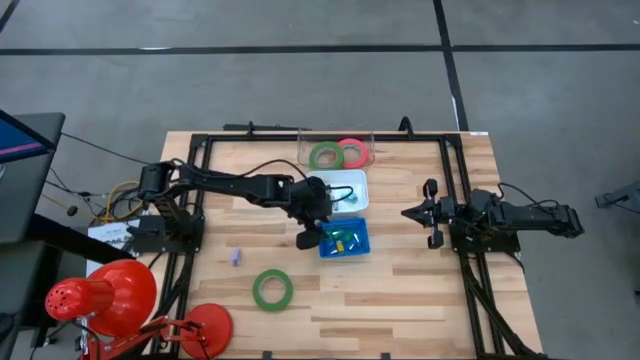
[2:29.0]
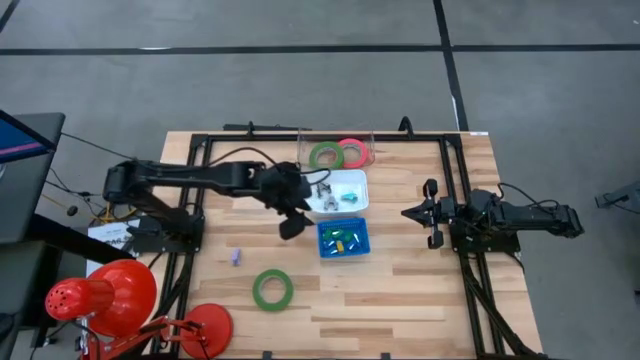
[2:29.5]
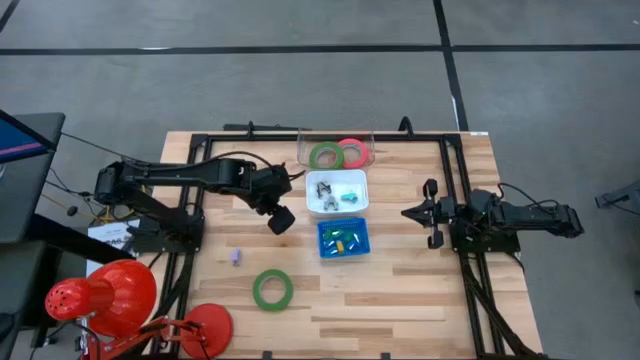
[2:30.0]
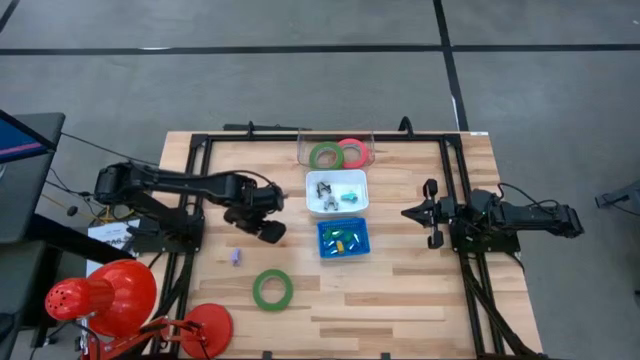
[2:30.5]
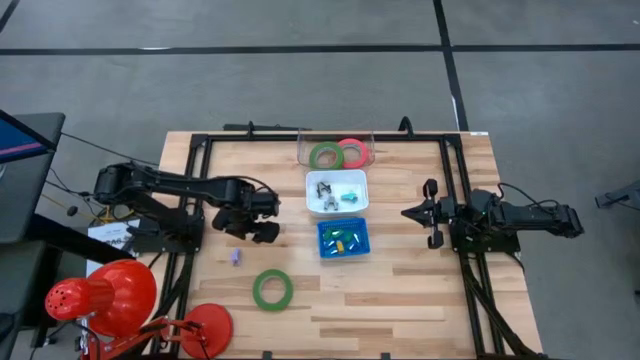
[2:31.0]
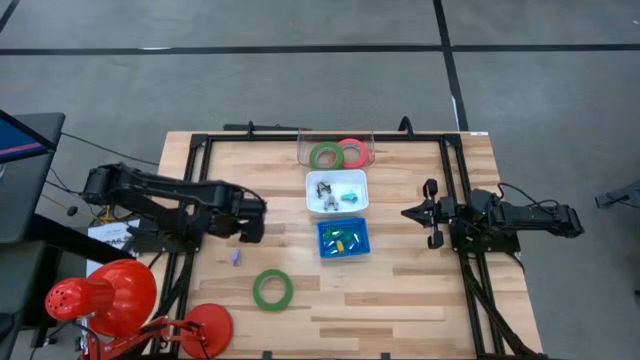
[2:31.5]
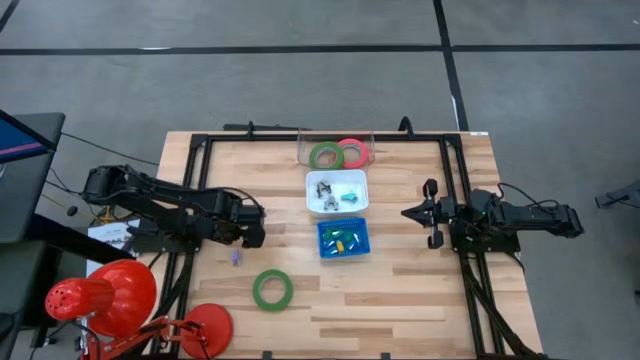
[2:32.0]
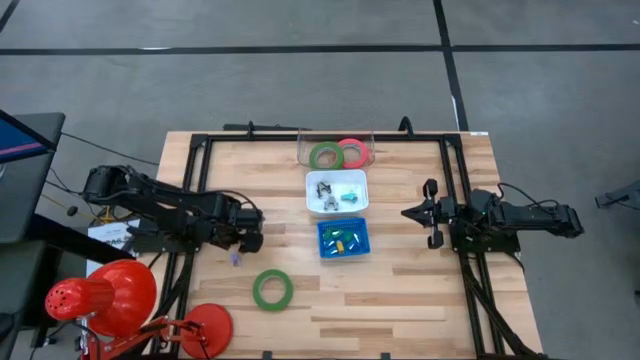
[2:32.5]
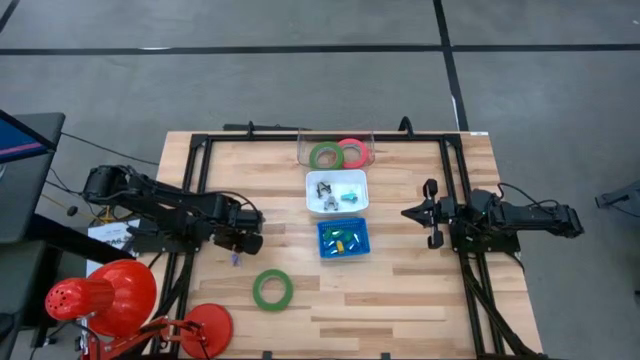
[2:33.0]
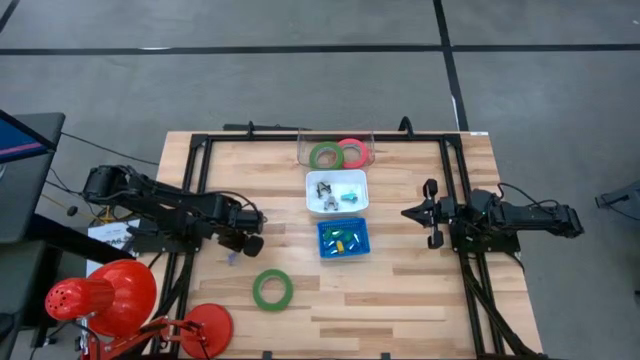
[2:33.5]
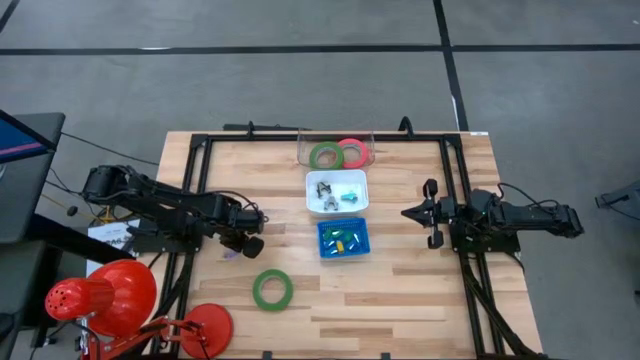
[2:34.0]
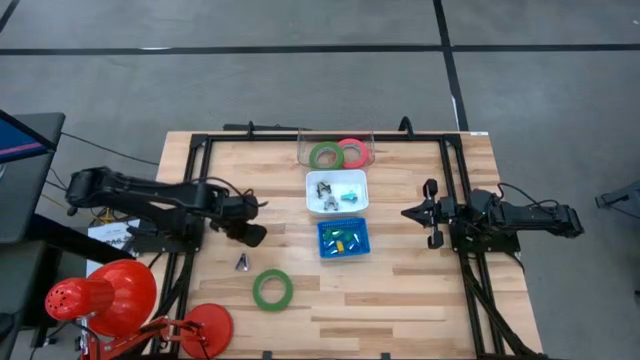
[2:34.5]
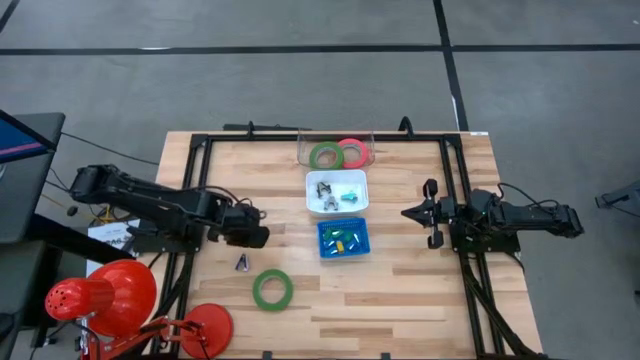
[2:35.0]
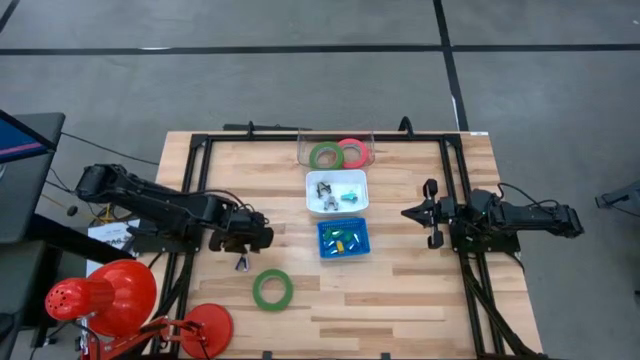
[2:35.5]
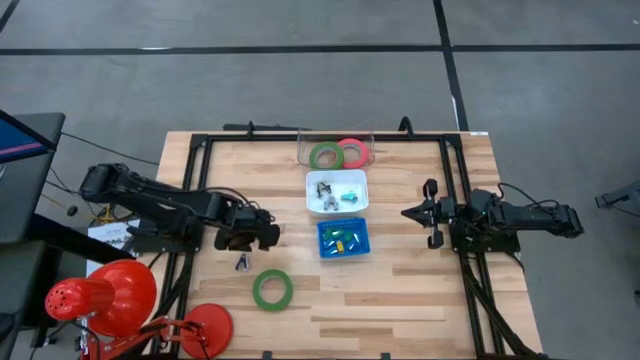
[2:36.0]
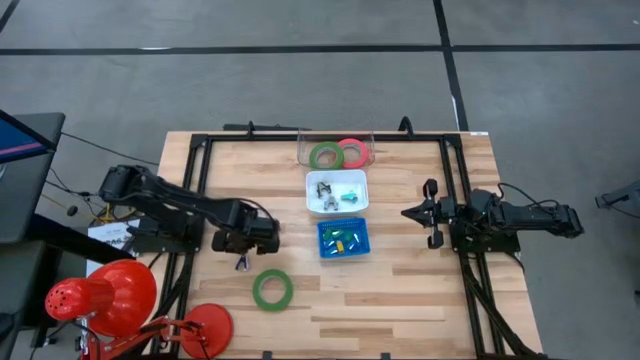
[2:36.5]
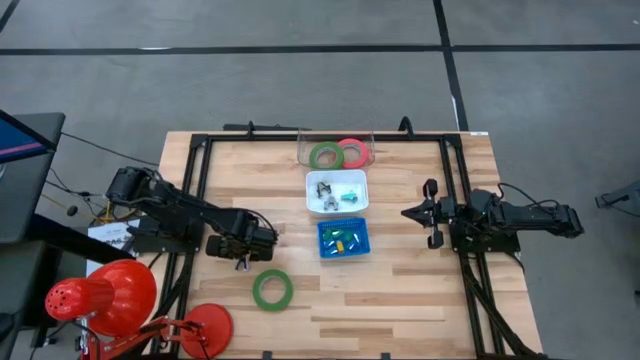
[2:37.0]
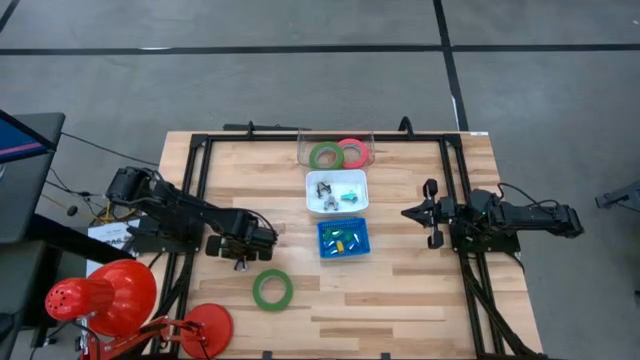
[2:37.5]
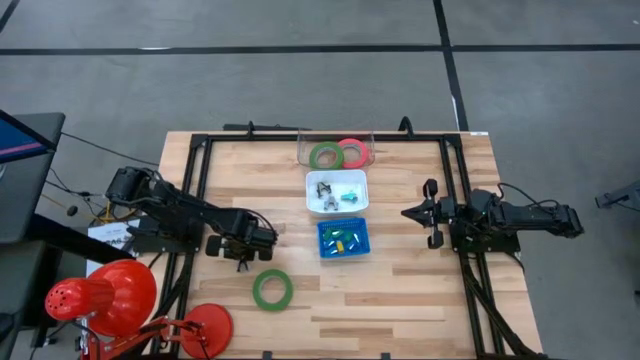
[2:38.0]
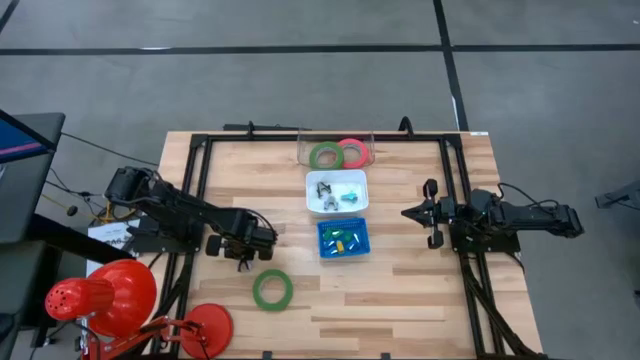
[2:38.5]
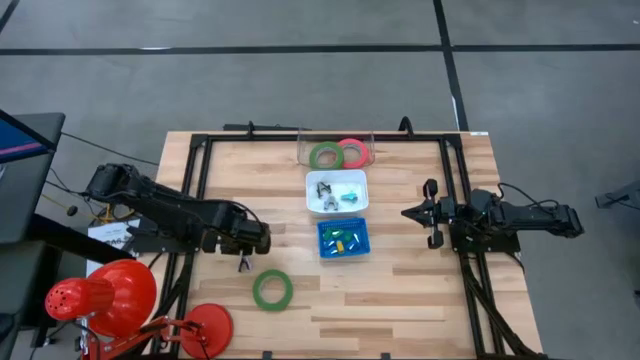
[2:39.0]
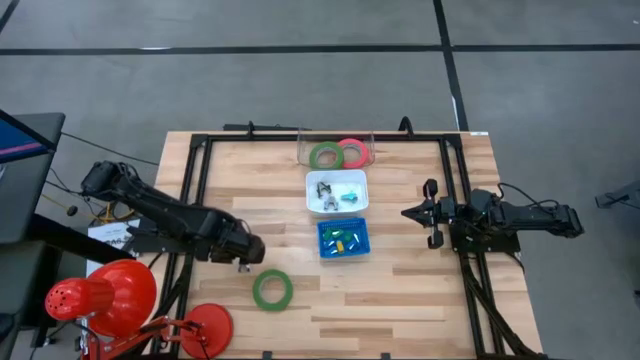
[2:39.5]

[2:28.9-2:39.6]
Task: Pick and place Stapler, Stapler remover, tape
Put the light purple staple remover into the white bin

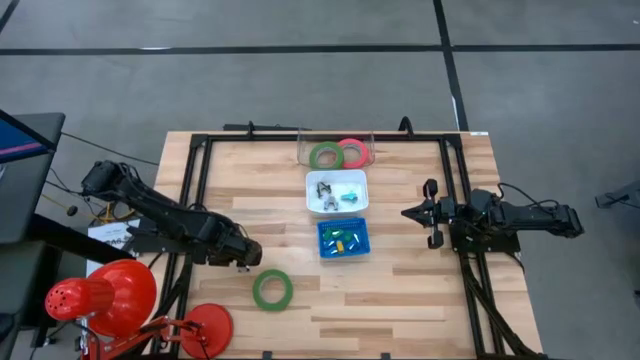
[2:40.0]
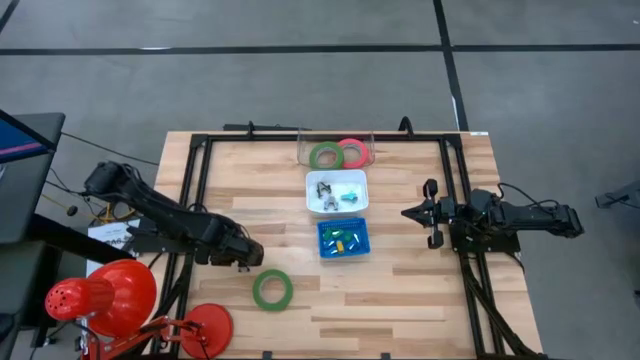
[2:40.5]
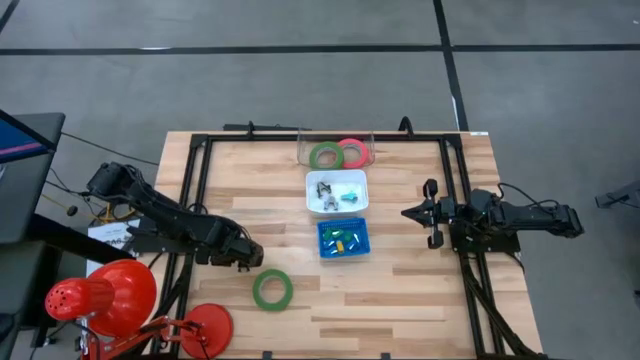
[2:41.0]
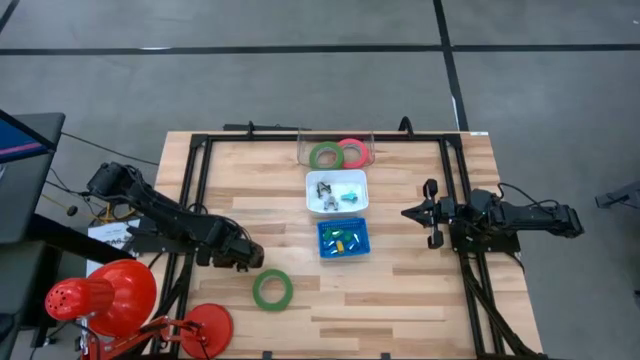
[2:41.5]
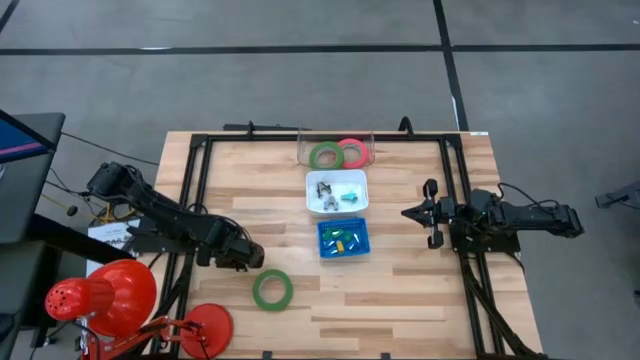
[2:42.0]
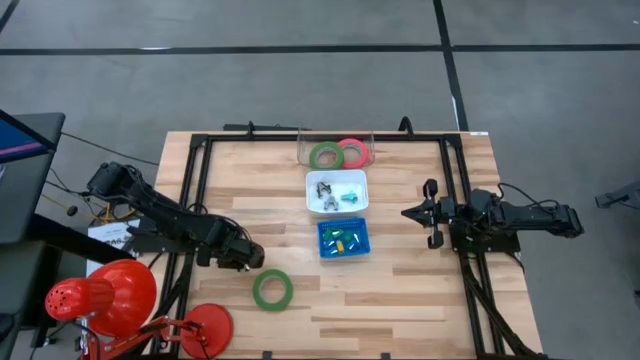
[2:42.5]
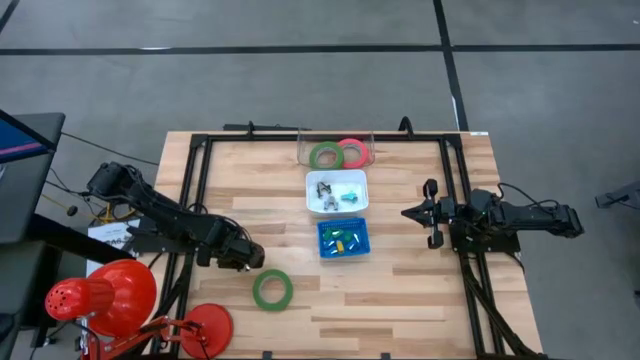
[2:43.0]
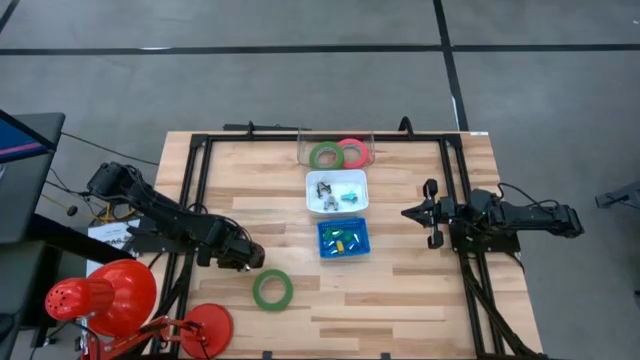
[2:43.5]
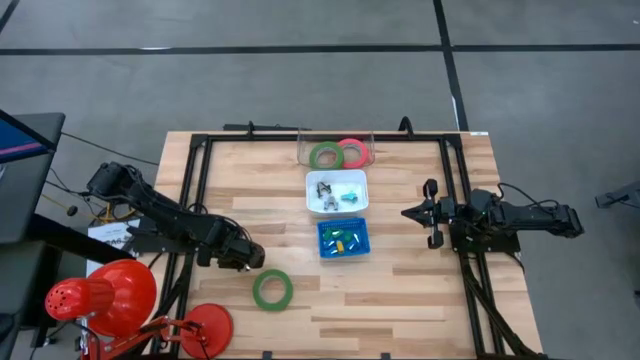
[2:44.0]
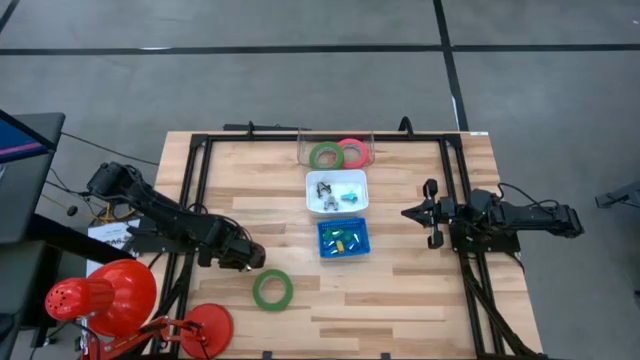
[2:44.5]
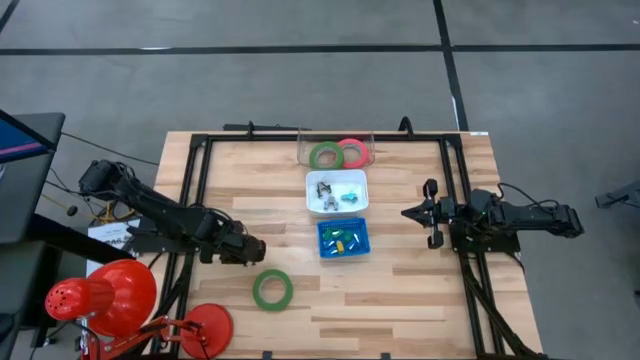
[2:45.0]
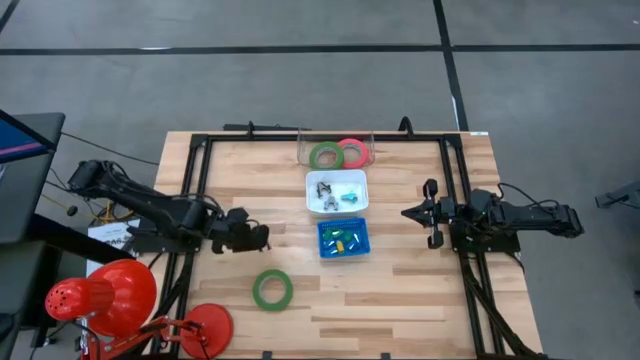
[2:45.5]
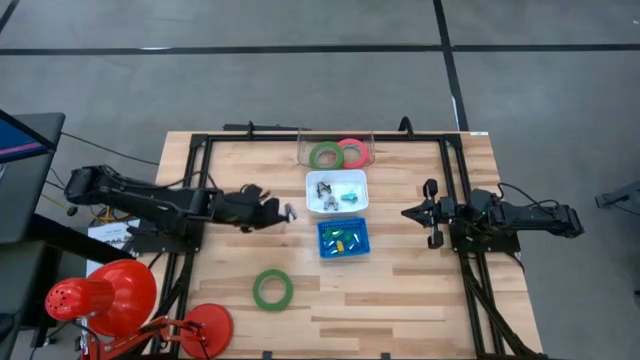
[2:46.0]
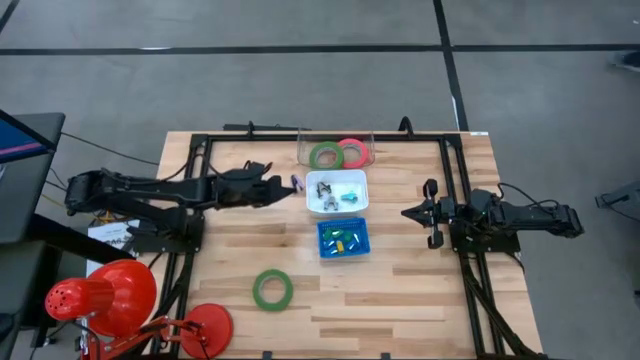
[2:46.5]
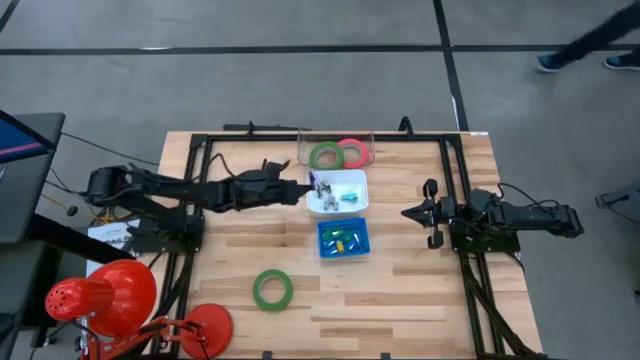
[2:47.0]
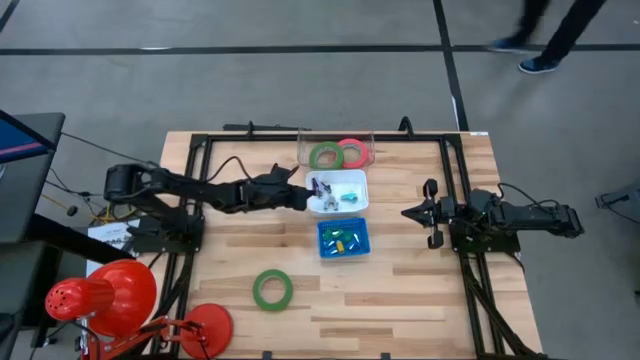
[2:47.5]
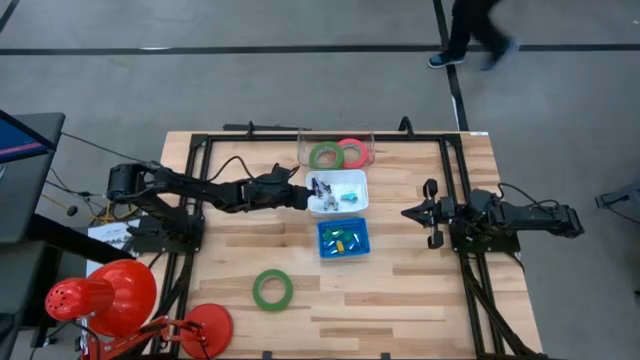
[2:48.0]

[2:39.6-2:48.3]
Put the light purple staple remover into the white bin

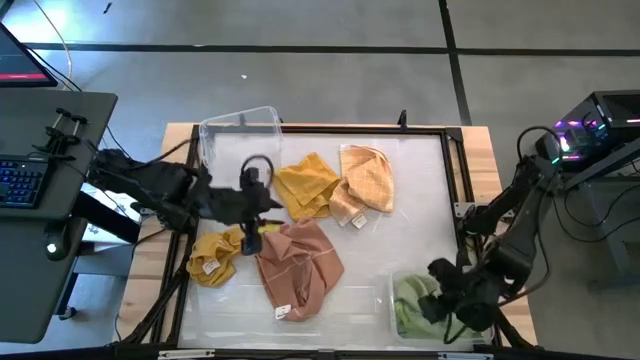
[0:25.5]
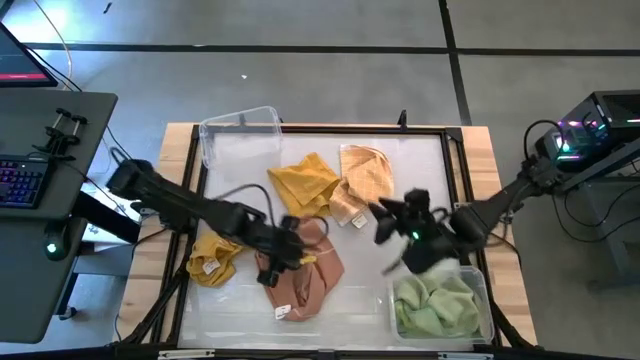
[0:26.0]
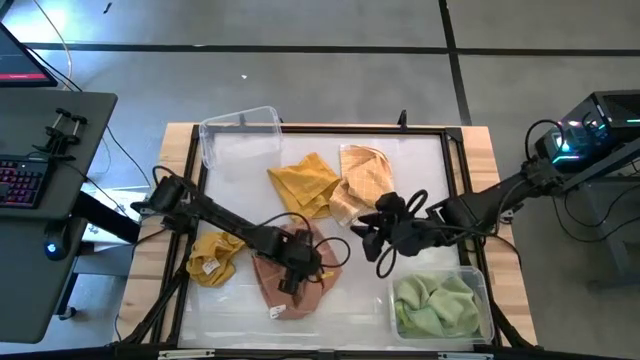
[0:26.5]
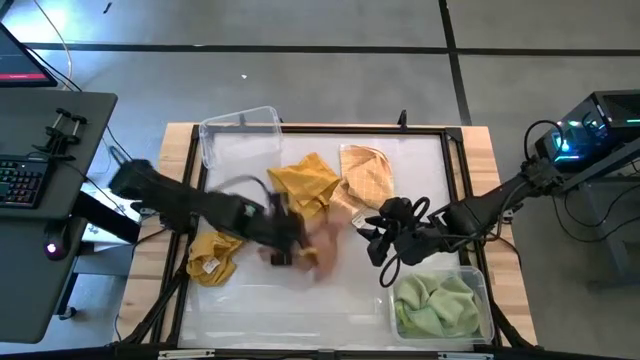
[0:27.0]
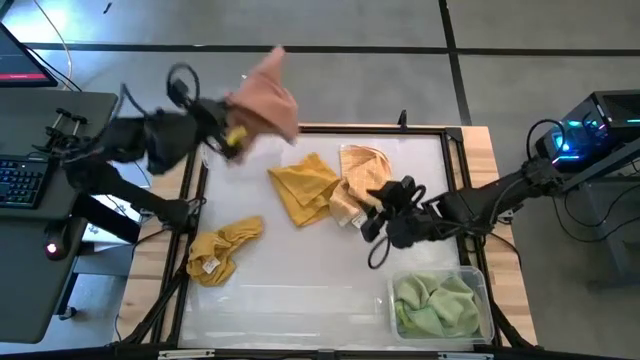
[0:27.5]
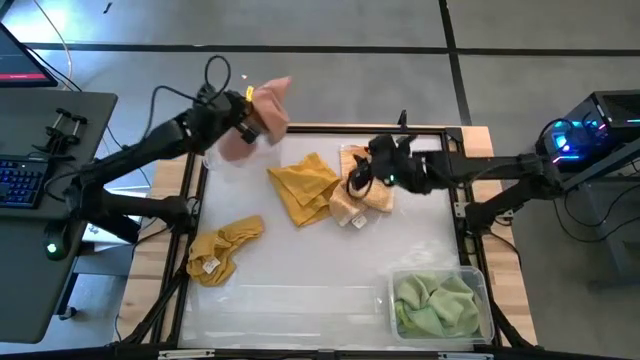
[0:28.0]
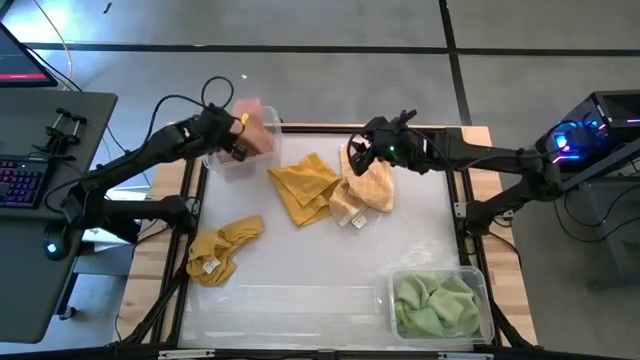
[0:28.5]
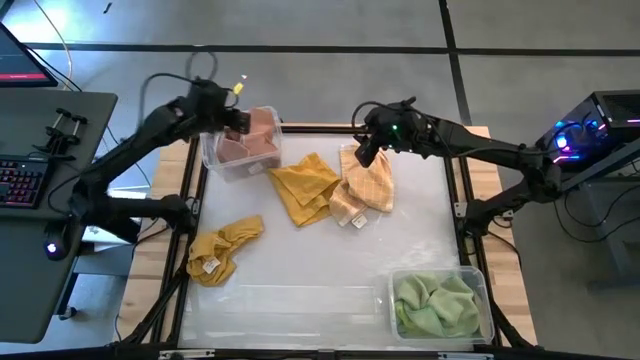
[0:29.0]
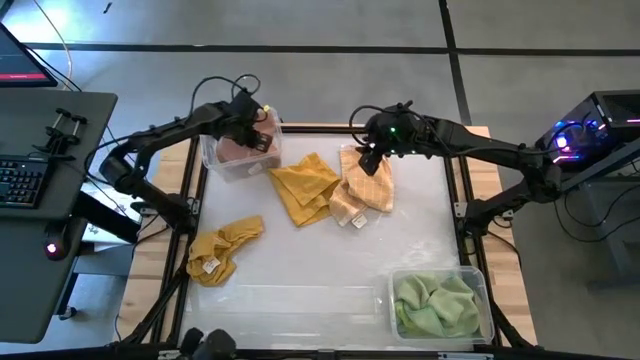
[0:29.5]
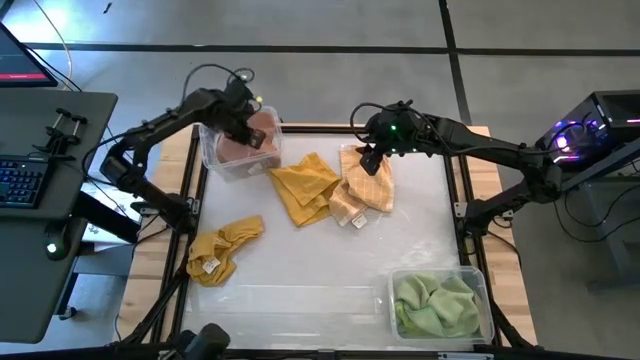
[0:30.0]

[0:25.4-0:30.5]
Task: Sort towels by color in basket
Put the brown kitchen towel into the top transparent bin
